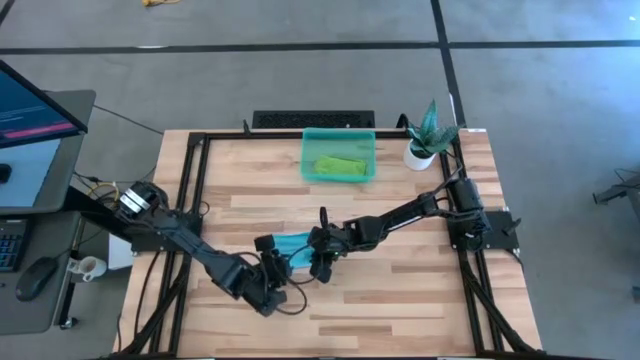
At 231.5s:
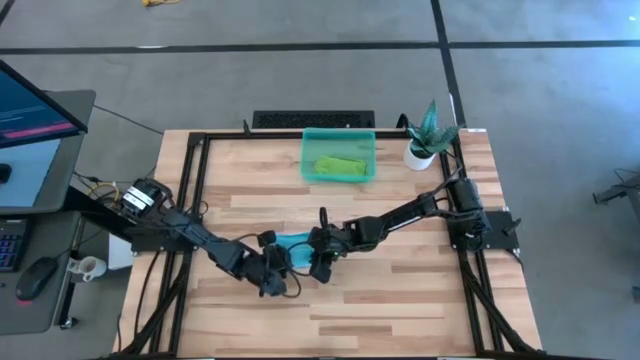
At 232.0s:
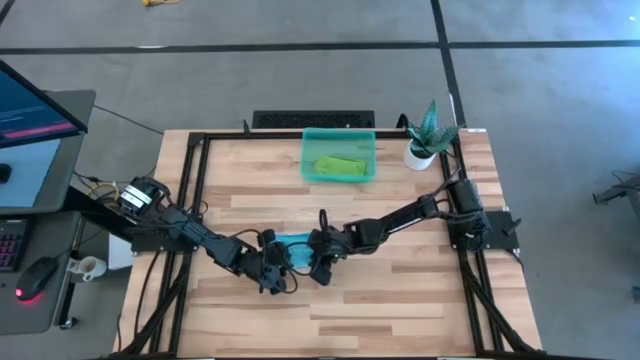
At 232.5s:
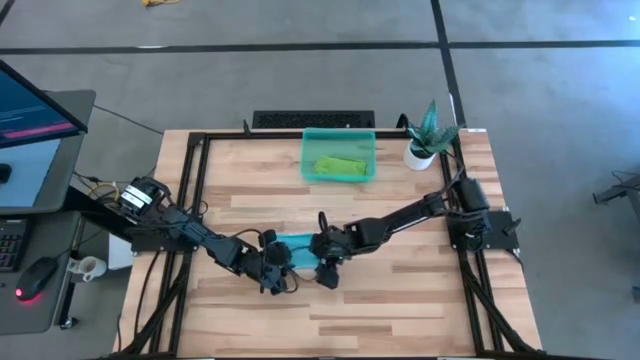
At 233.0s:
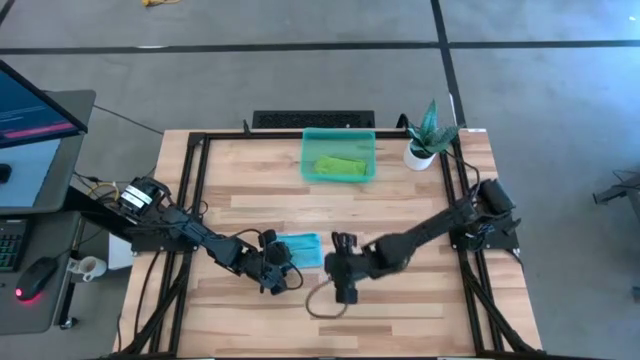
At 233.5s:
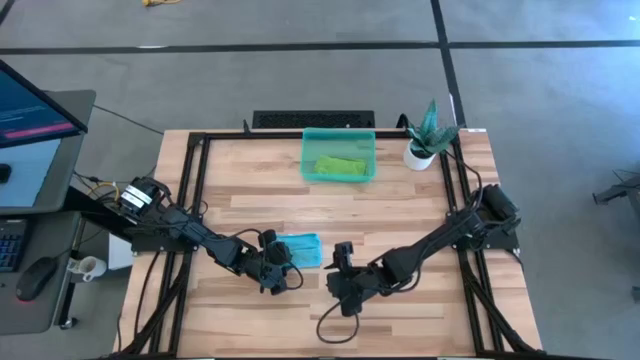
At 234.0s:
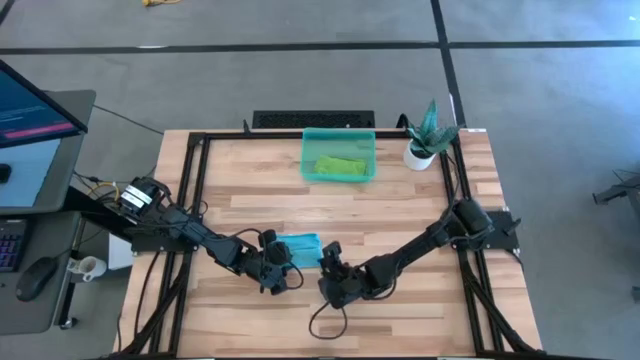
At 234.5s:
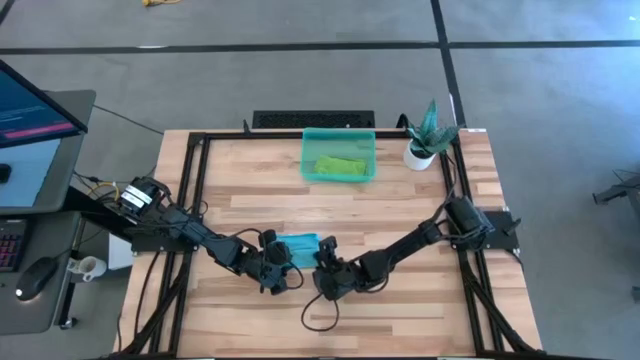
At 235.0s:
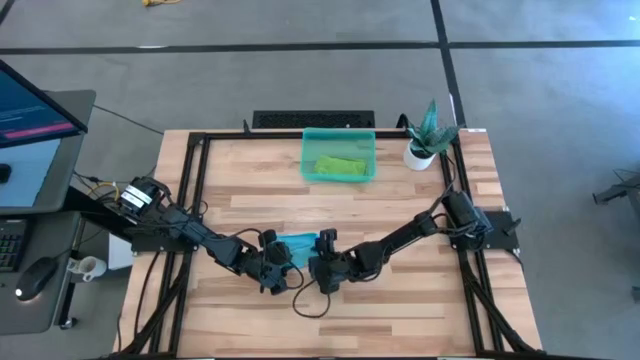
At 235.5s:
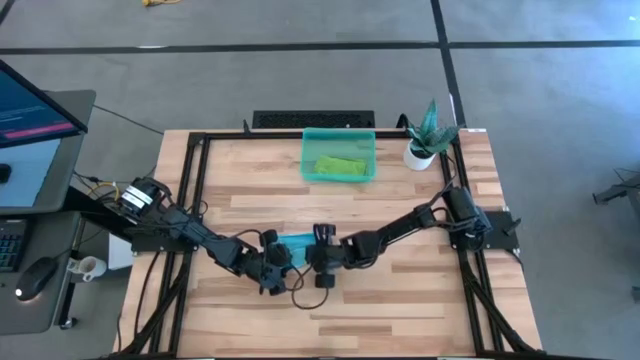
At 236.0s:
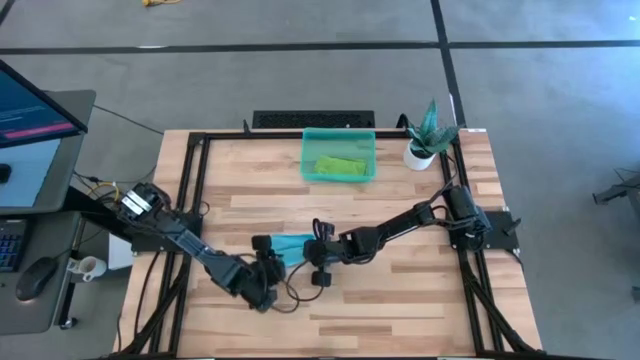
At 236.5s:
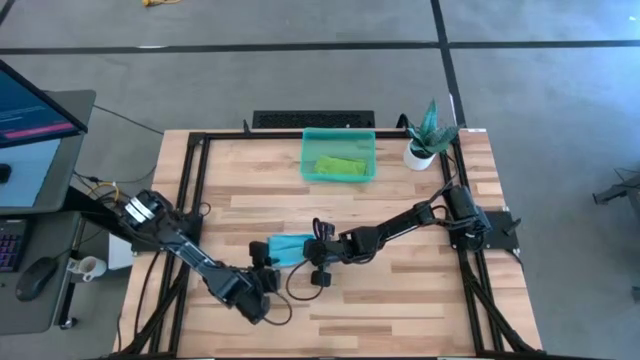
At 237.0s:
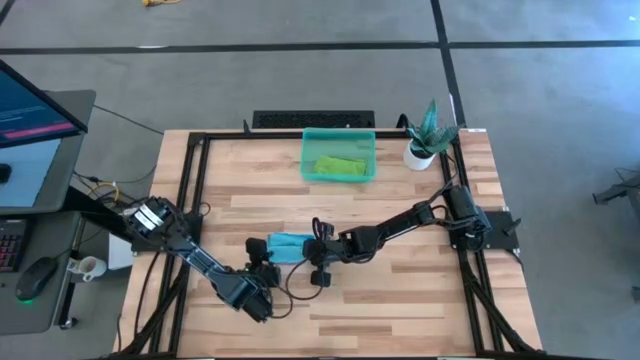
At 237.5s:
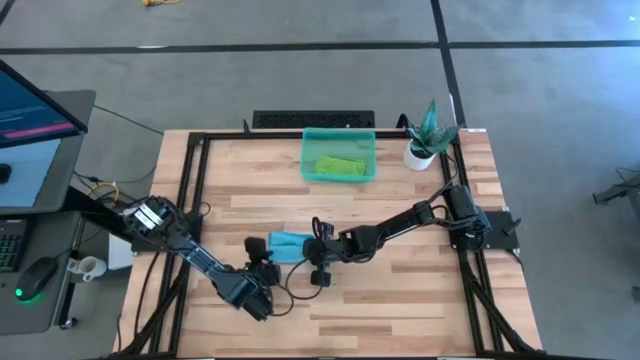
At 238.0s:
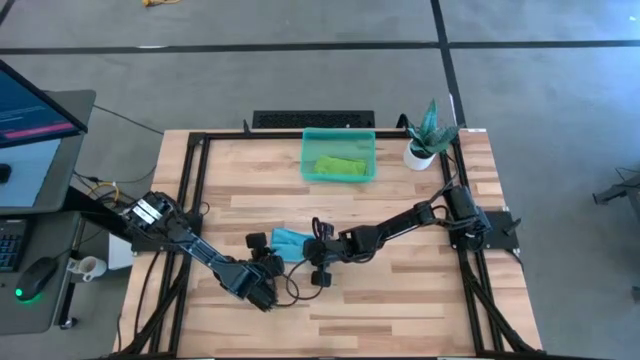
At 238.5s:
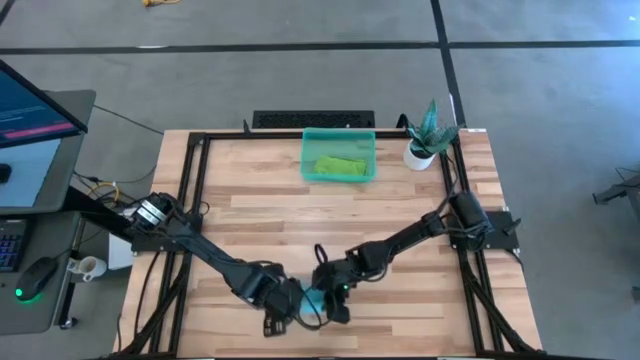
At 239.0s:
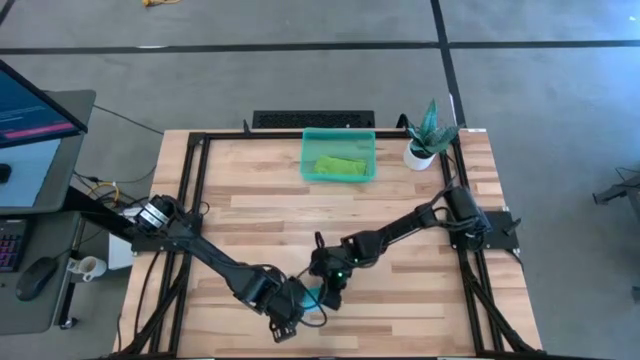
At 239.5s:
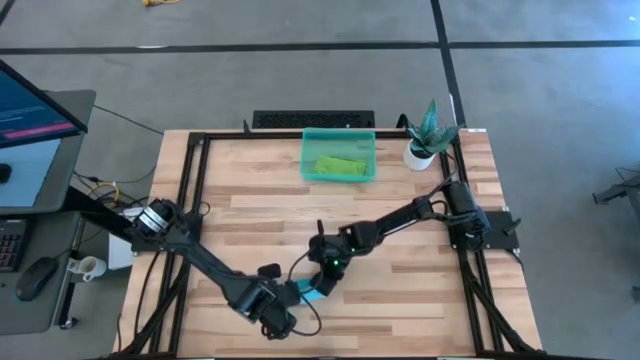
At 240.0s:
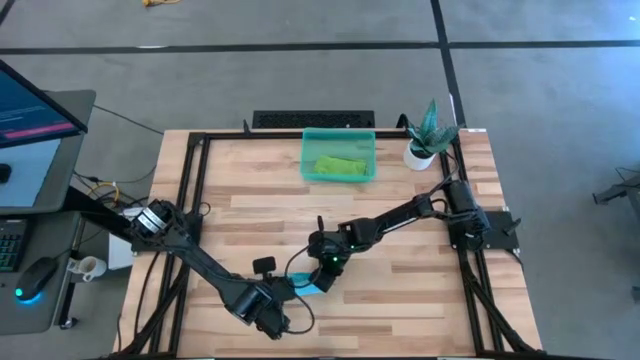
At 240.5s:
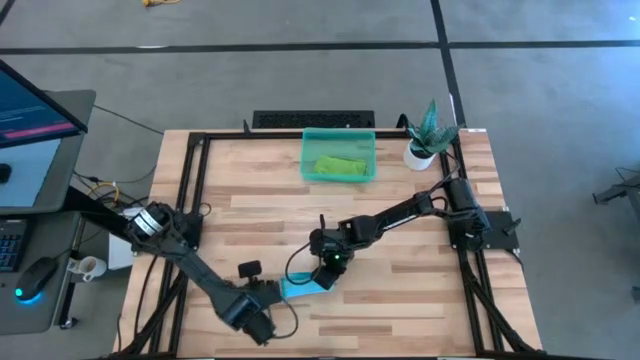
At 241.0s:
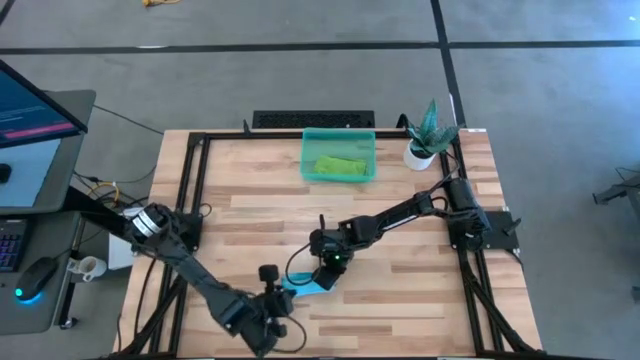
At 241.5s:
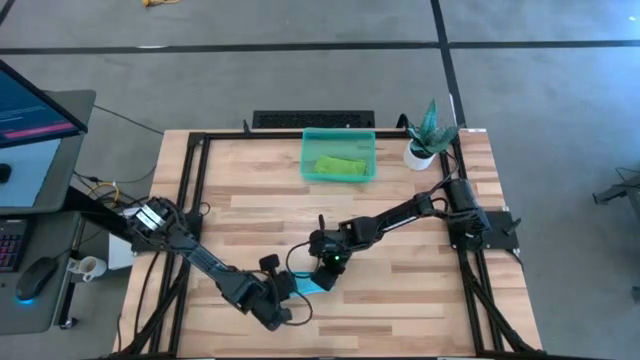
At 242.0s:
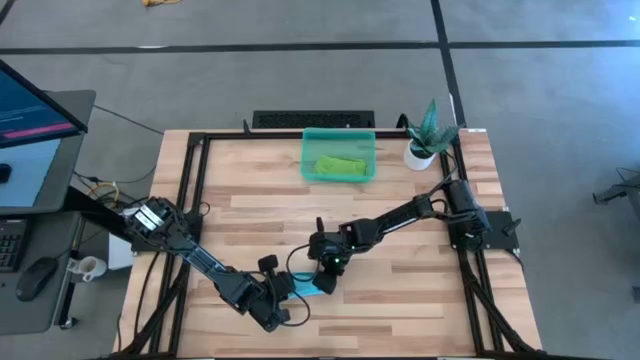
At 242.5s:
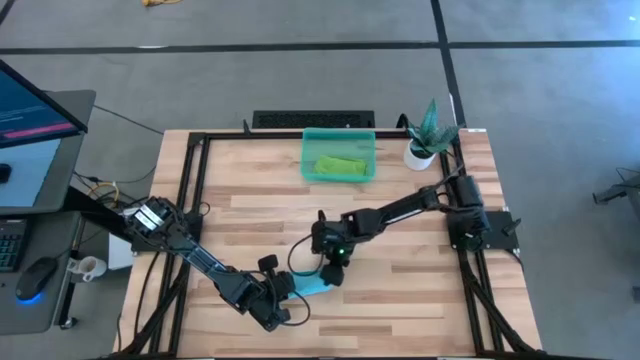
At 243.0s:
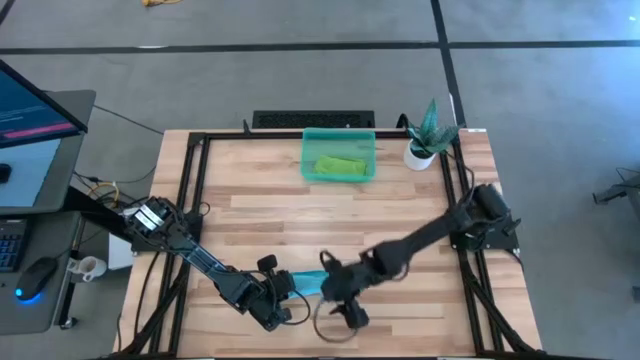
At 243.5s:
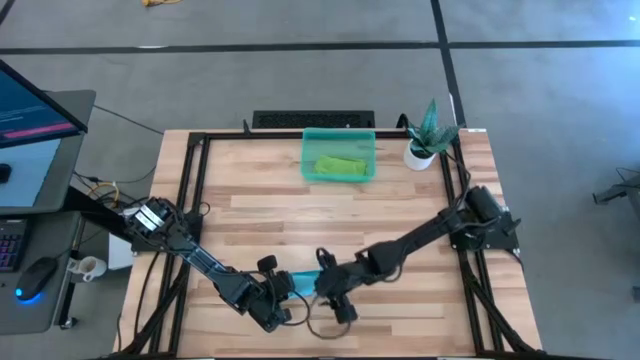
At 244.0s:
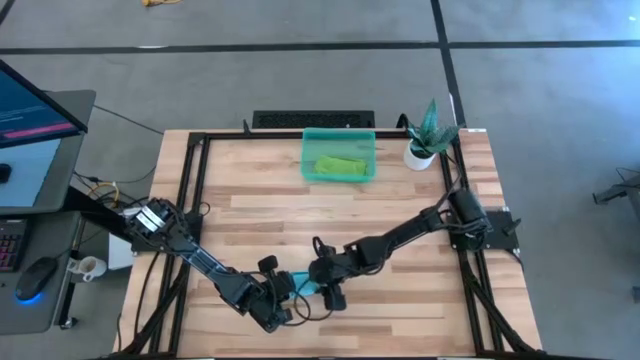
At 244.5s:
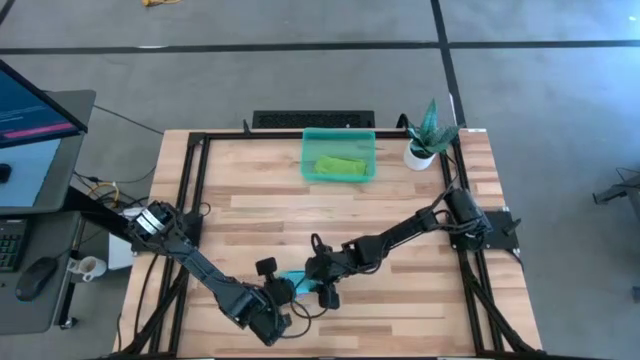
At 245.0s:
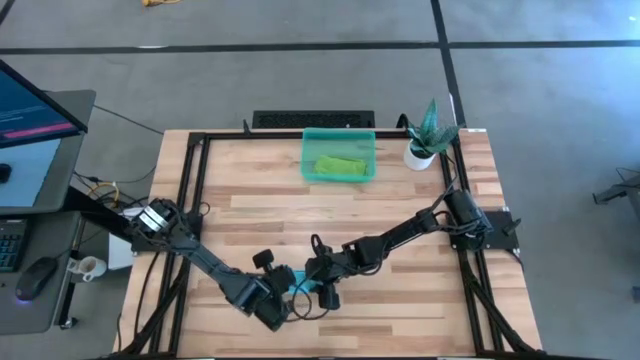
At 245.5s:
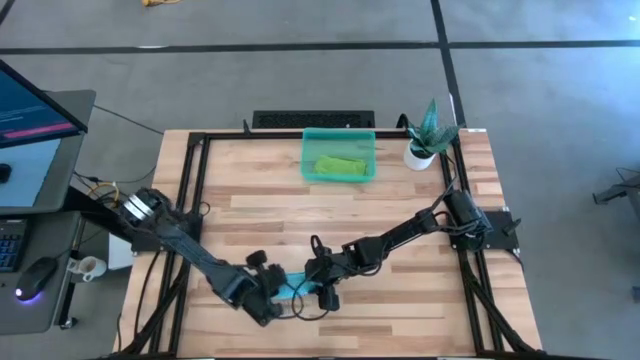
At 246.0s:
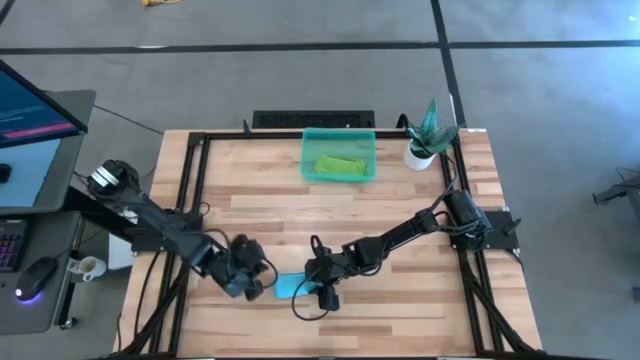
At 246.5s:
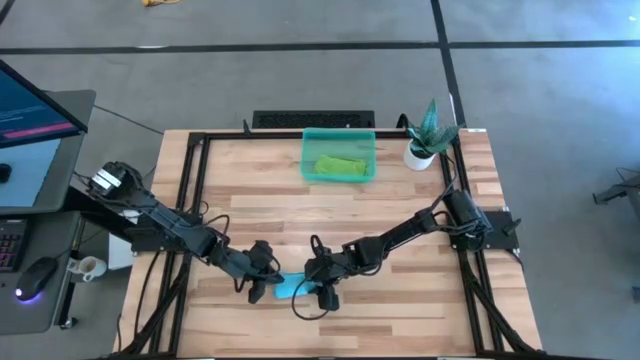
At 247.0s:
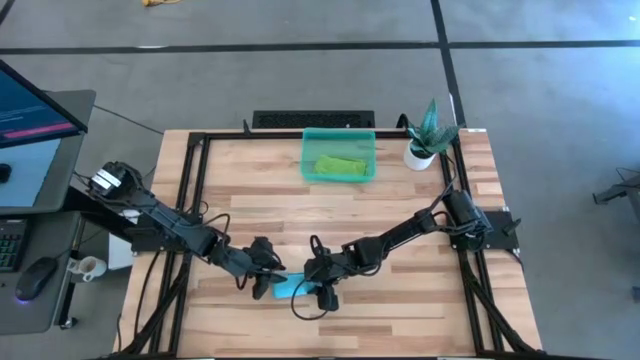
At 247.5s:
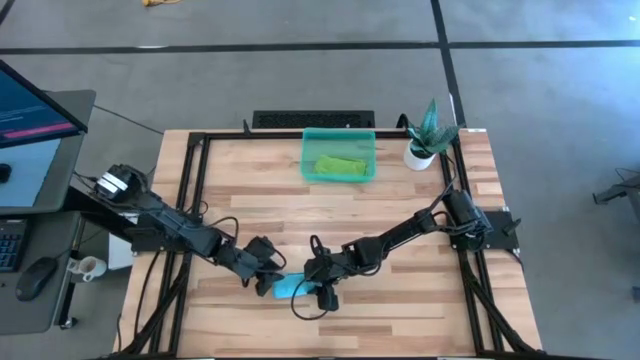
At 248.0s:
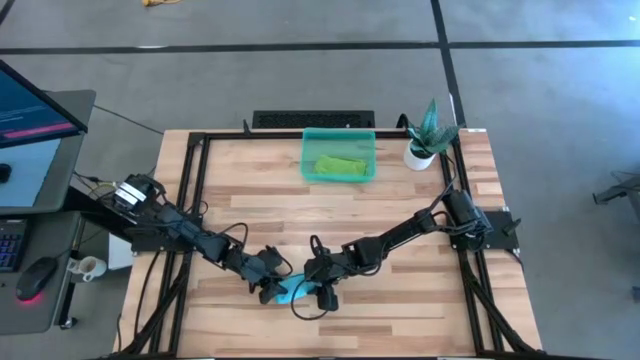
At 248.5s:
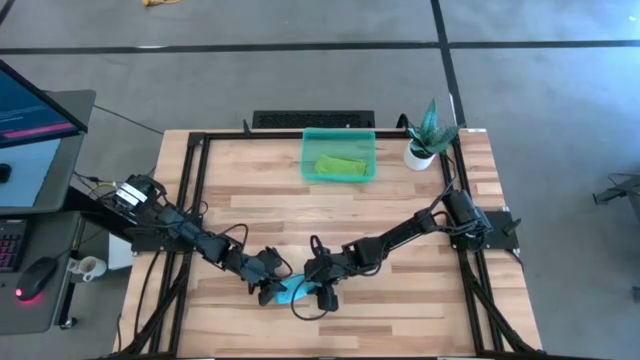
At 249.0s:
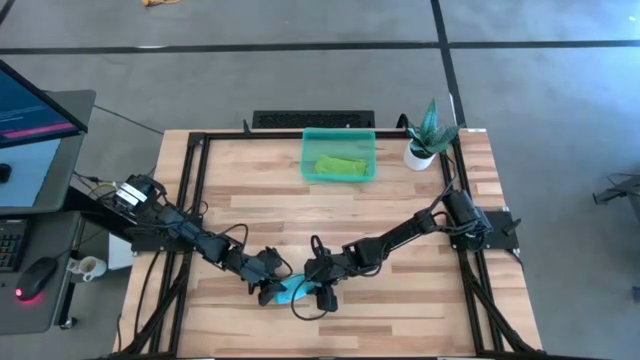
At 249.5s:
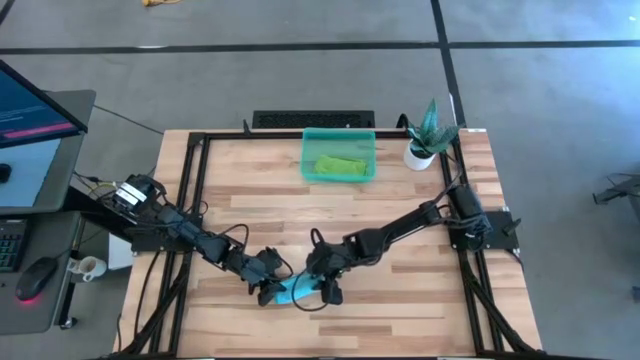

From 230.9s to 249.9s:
Task: Roll microfiber towels into tight, uniform cylinder then place into a basket
Roll the blue microfiber cloth

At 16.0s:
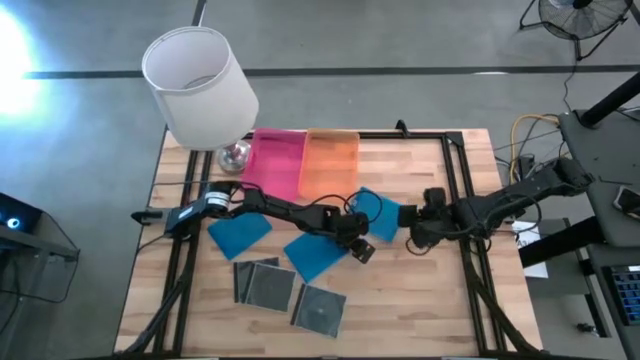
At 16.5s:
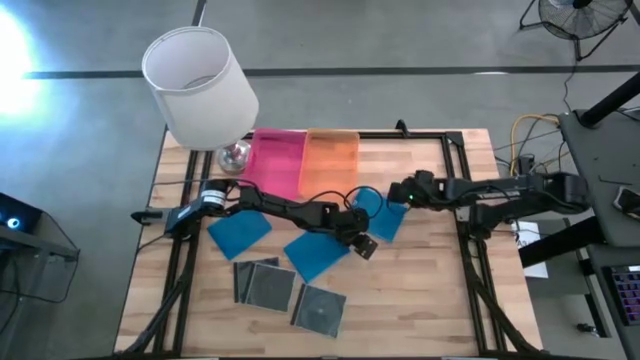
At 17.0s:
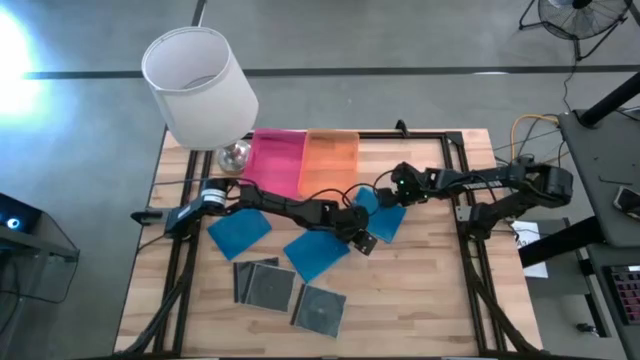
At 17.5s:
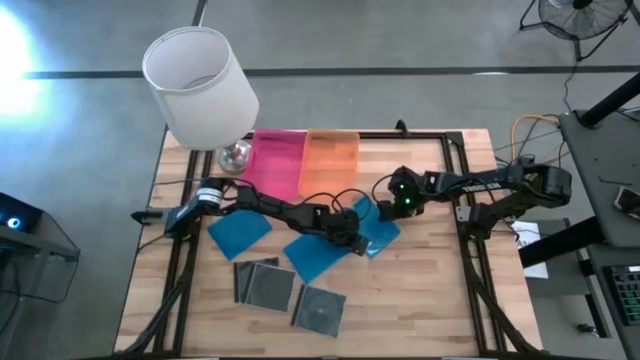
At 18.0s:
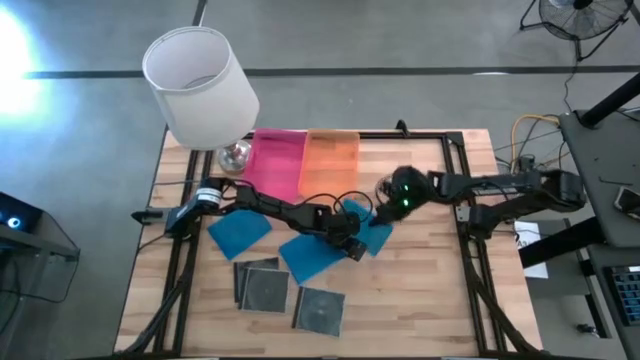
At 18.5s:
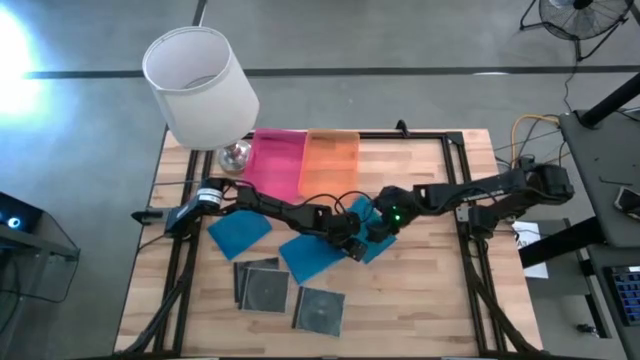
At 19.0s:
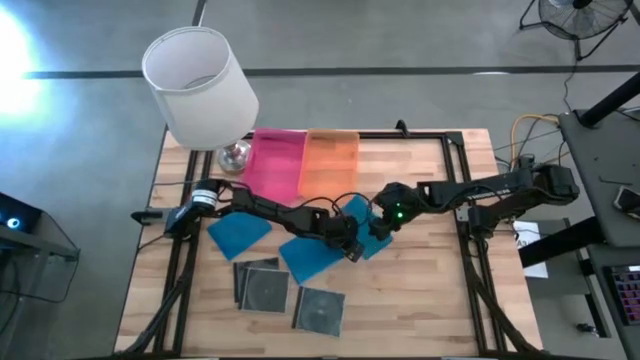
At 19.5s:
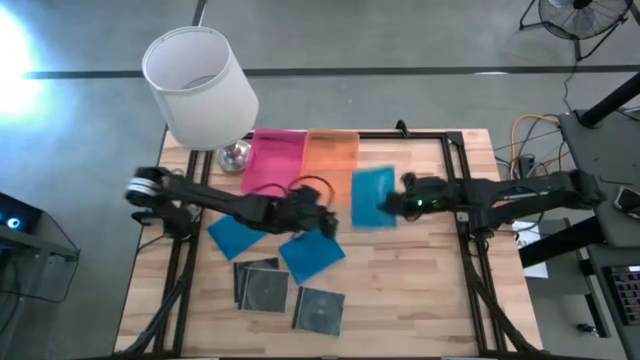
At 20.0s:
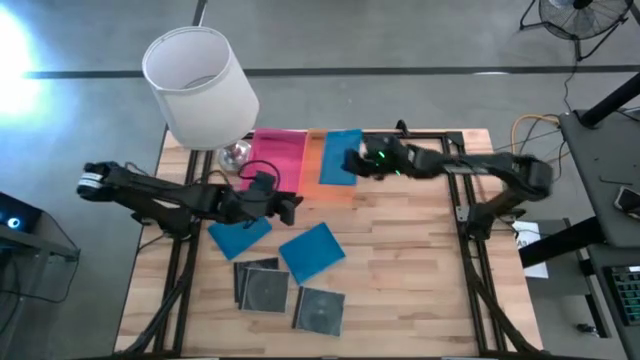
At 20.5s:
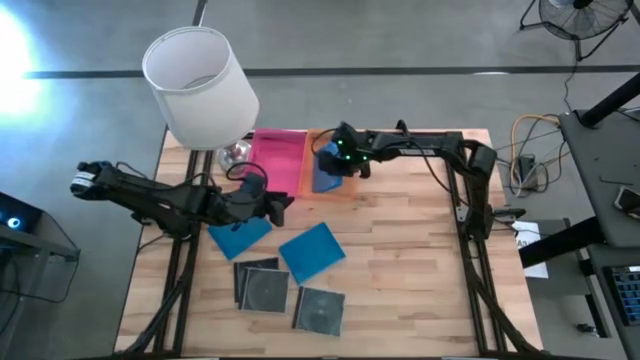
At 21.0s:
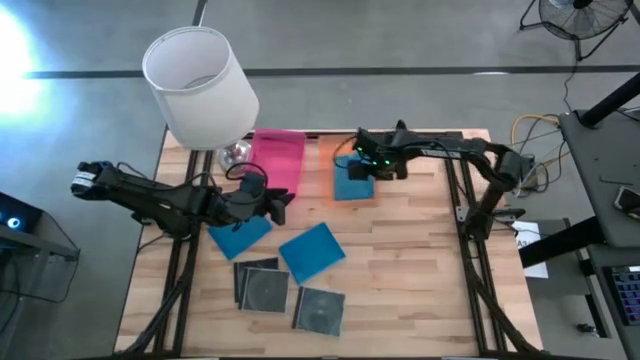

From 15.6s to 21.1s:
Task: Pick & place jewel cases by type
Put the blue cd case into the orange bin
